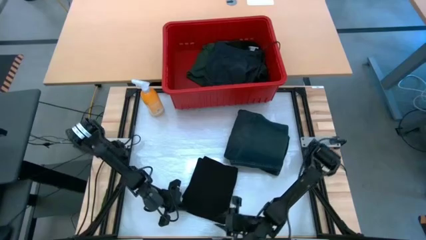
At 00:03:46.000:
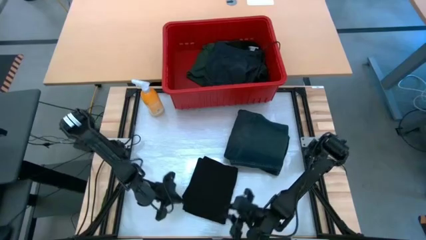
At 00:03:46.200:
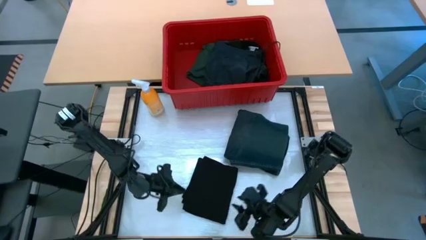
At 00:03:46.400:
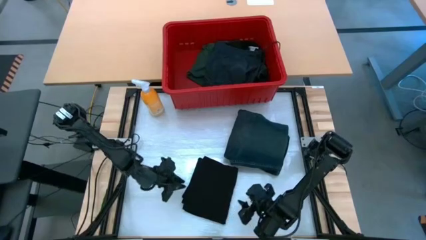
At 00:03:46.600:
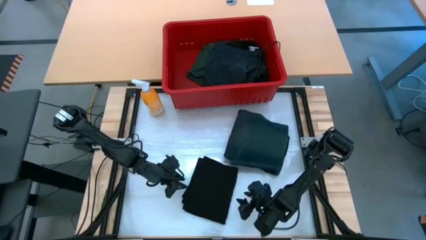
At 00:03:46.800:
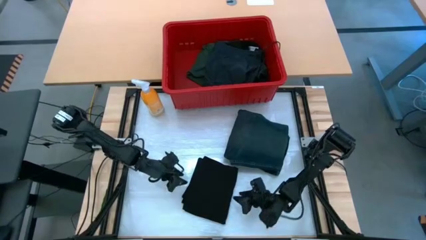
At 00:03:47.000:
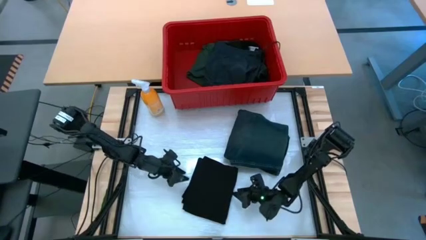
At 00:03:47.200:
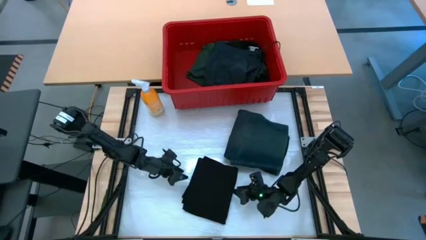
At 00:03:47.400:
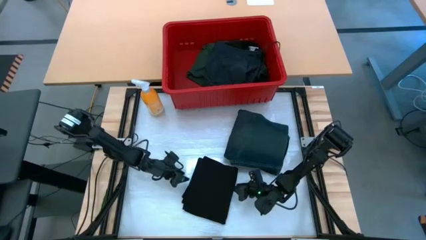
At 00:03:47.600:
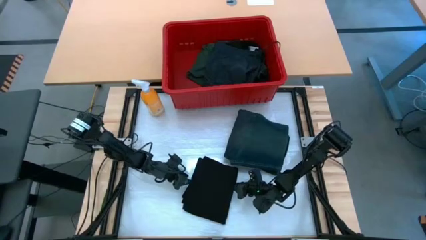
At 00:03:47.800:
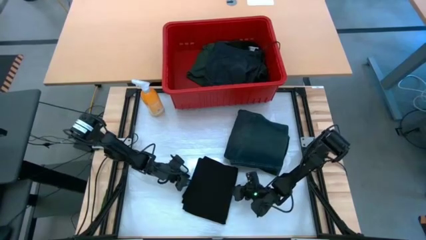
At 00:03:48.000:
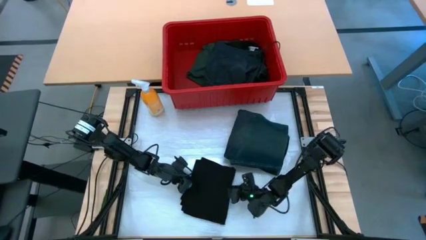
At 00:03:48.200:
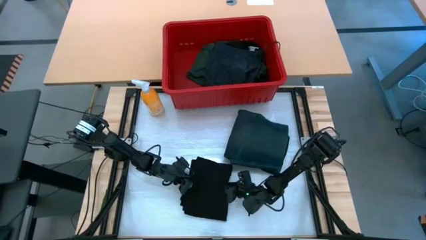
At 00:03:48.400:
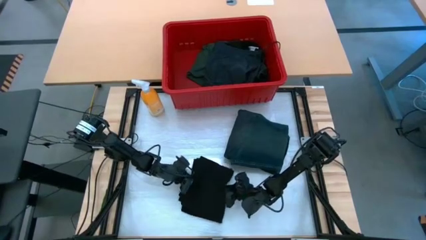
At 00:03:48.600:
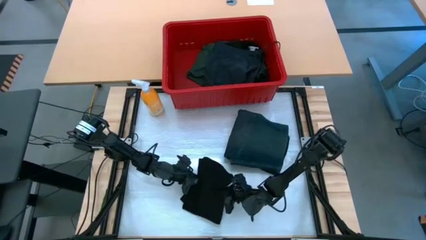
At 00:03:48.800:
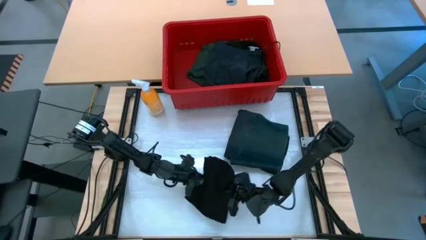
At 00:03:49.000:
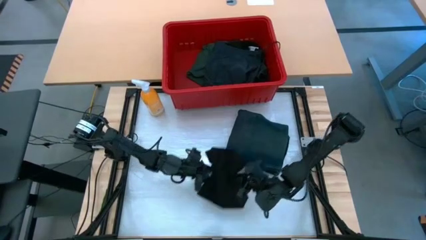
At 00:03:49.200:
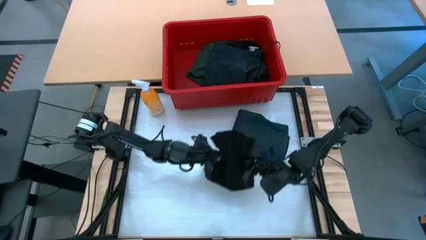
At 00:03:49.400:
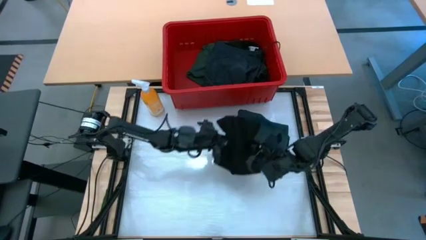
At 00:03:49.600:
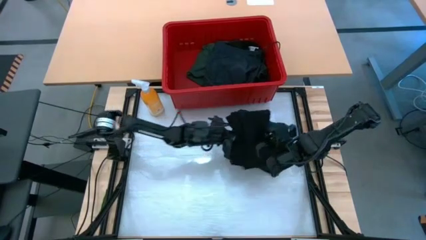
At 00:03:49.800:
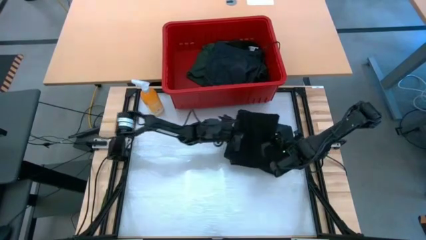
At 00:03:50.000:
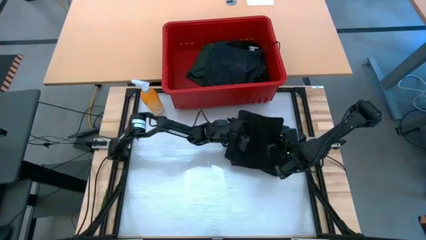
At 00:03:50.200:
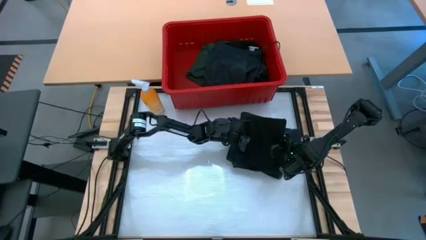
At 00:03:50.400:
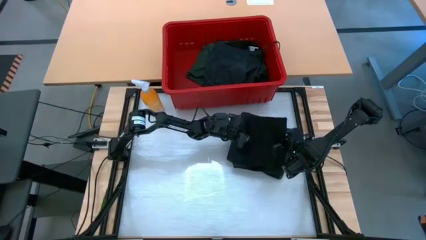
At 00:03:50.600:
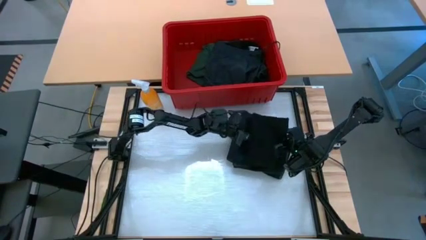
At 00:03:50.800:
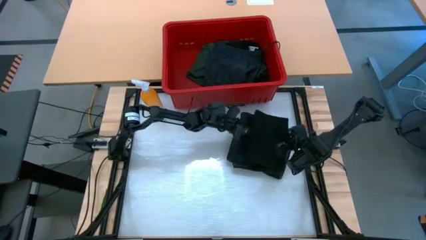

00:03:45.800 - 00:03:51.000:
Task: Fold Laundry from Bin
Stack the black shirt on top of the dark blue pants

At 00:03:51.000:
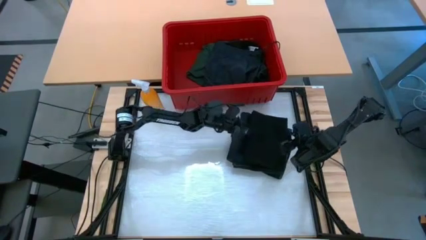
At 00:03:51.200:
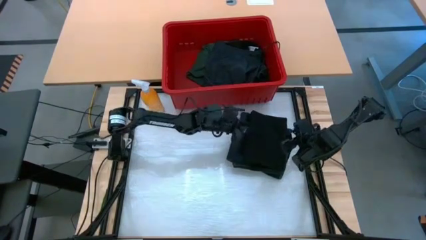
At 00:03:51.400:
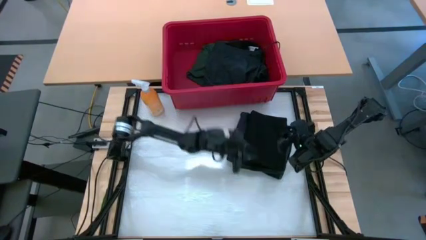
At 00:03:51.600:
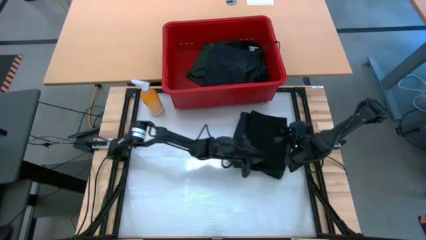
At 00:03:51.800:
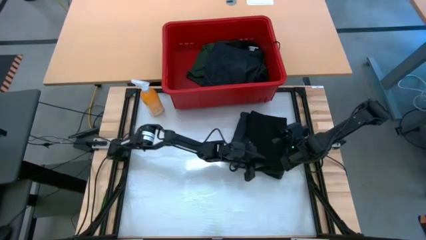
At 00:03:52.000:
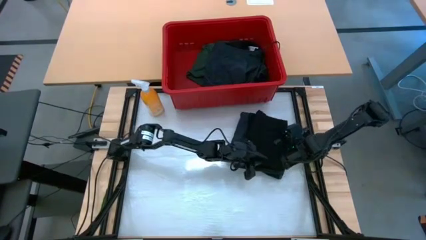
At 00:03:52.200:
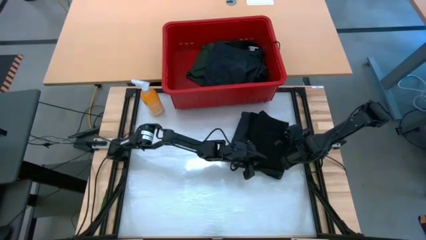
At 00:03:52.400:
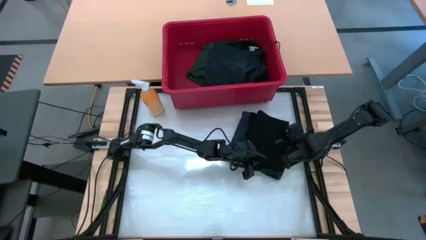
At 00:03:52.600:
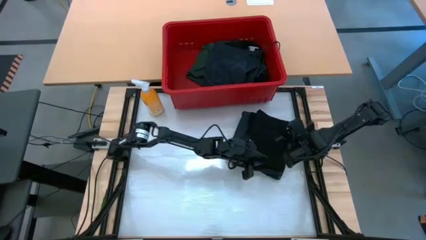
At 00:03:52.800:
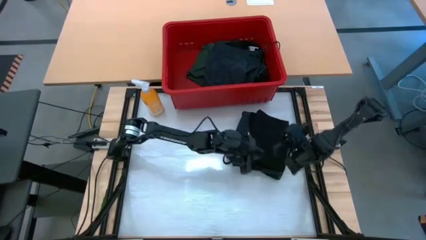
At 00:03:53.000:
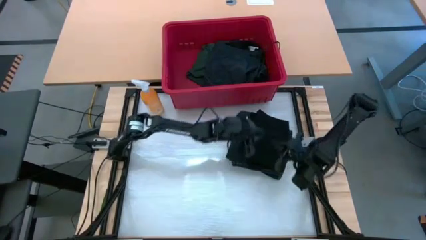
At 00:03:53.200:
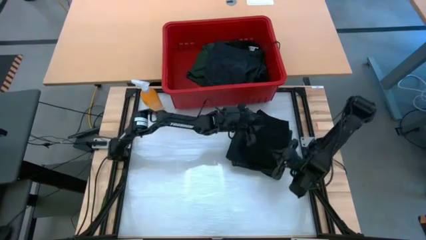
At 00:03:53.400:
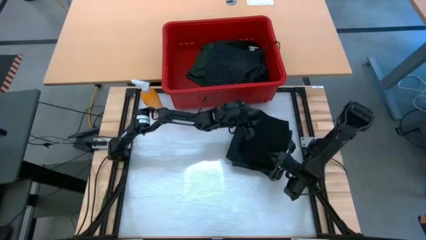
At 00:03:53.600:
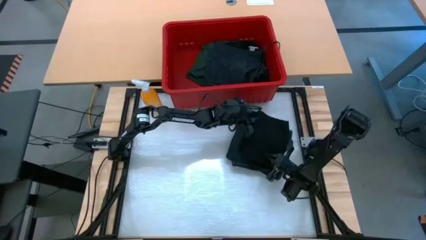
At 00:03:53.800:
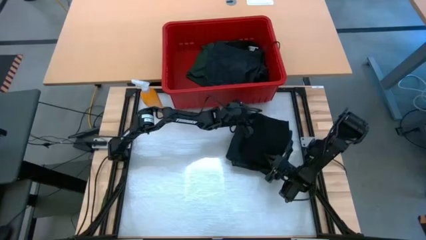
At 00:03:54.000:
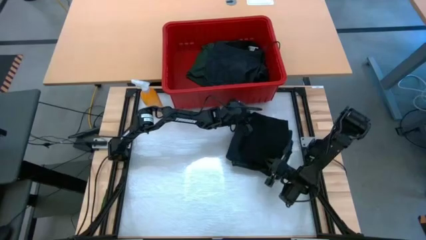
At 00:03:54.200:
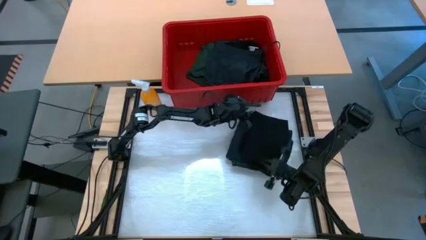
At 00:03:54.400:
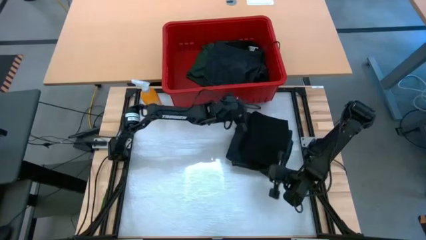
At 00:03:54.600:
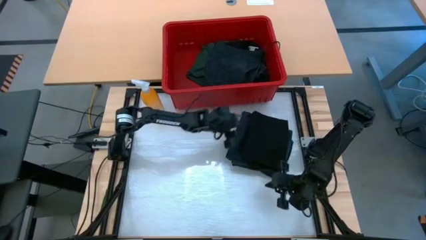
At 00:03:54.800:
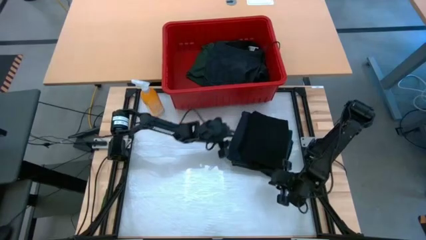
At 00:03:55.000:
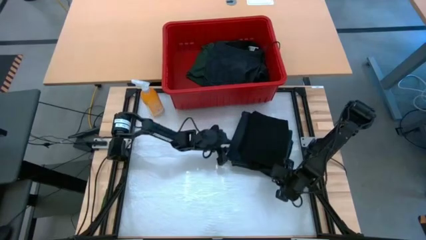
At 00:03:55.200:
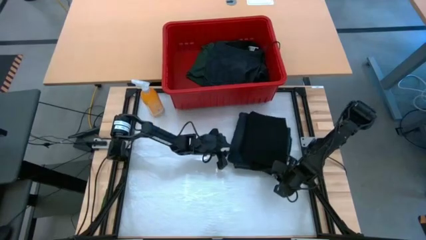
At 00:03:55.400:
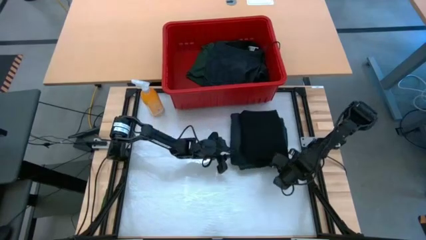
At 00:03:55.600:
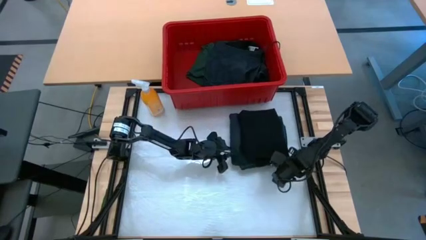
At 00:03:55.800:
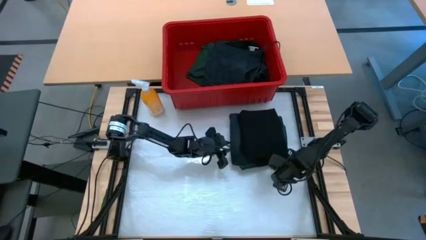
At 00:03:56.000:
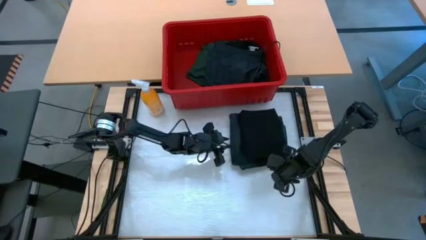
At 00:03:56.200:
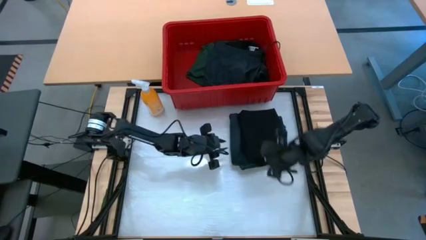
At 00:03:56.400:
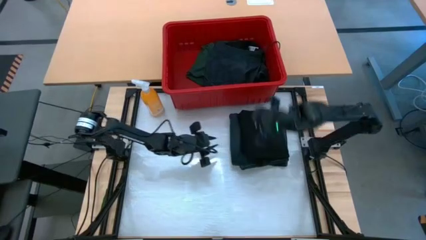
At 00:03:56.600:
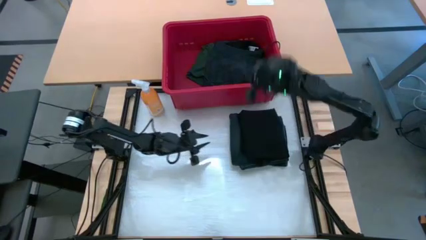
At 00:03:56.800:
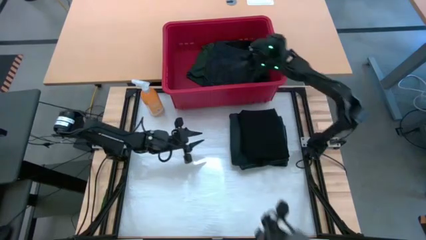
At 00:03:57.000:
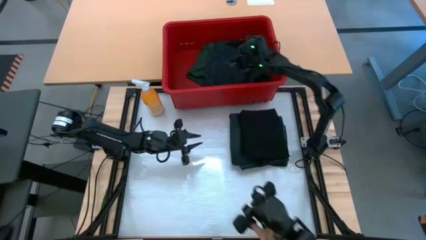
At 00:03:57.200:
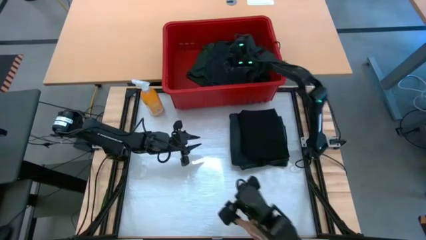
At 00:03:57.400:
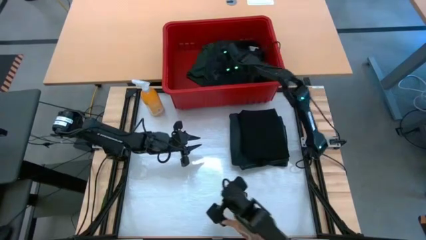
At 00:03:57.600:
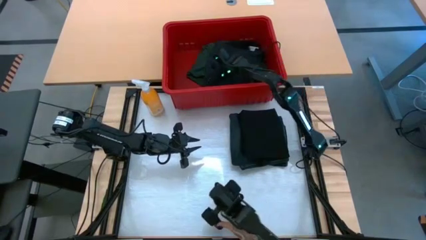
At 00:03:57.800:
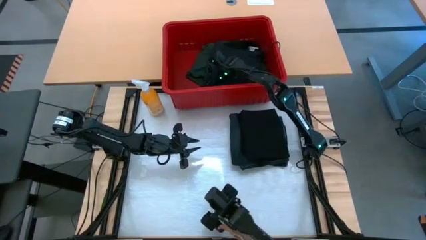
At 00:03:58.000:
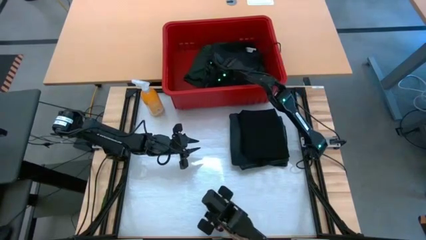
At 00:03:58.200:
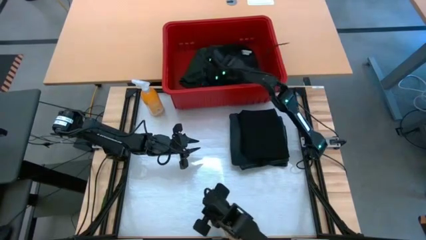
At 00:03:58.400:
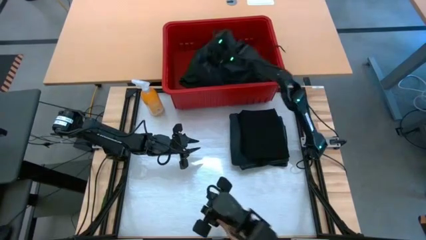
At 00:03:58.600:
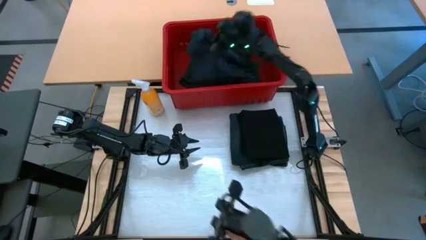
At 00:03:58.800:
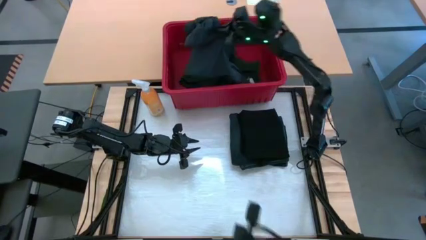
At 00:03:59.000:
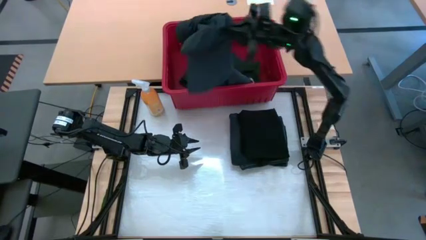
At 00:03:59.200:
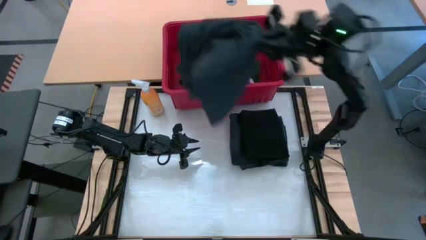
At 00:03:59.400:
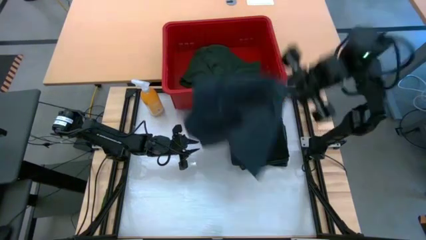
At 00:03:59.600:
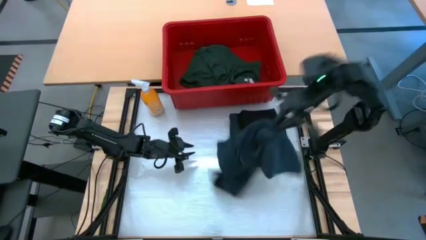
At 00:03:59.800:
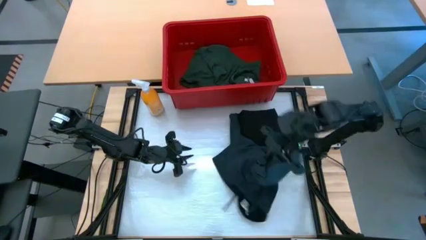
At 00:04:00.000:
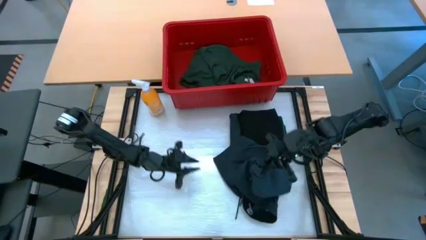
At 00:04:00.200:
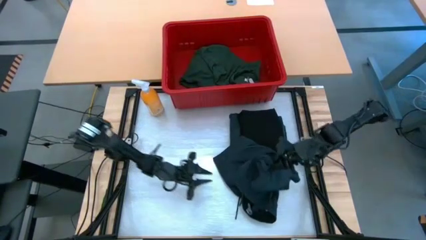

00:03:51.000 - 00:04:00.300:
Remove the black shorts from the red bin
